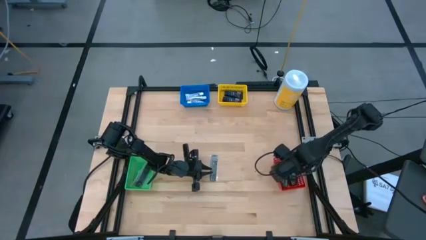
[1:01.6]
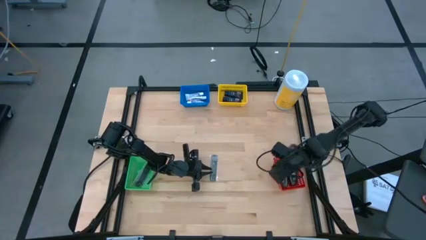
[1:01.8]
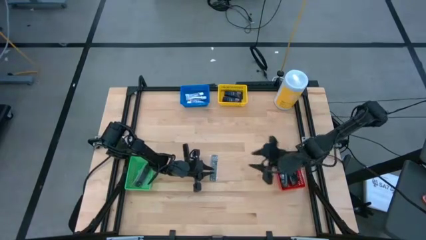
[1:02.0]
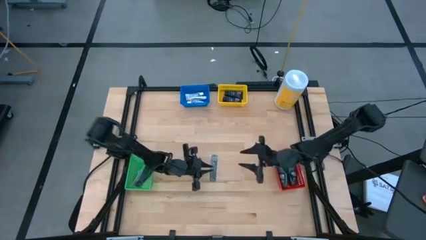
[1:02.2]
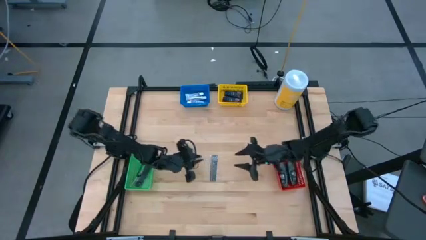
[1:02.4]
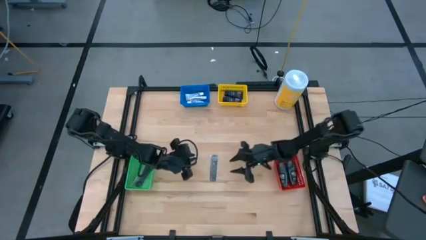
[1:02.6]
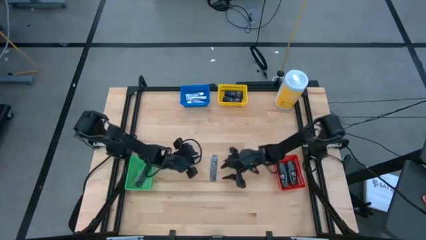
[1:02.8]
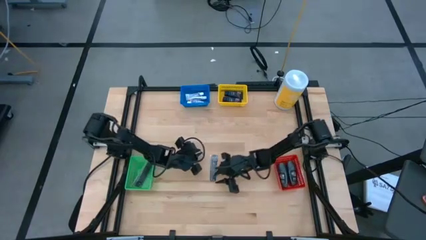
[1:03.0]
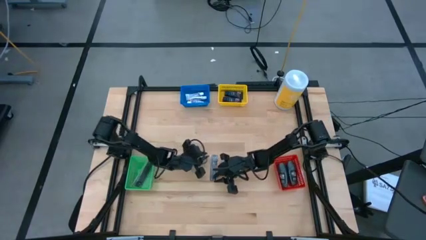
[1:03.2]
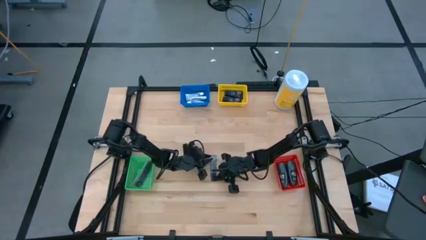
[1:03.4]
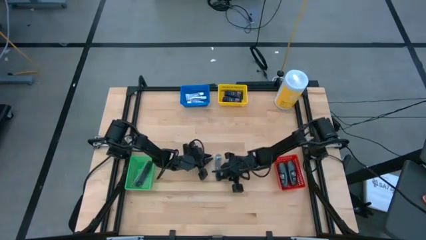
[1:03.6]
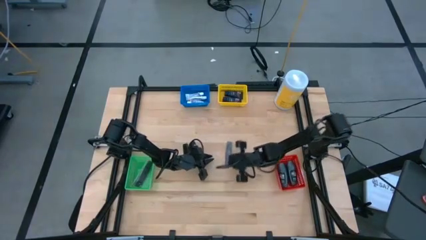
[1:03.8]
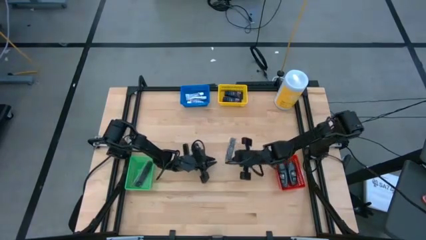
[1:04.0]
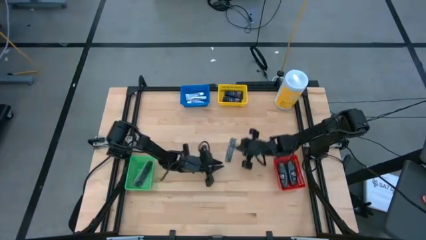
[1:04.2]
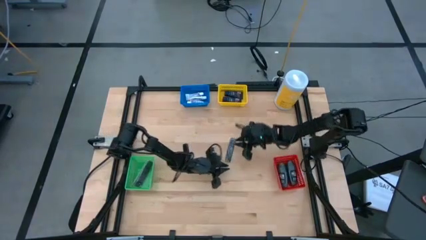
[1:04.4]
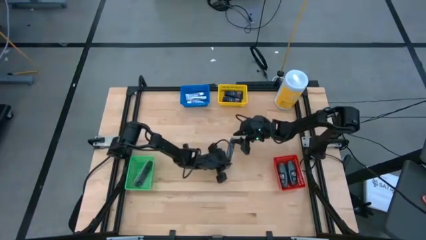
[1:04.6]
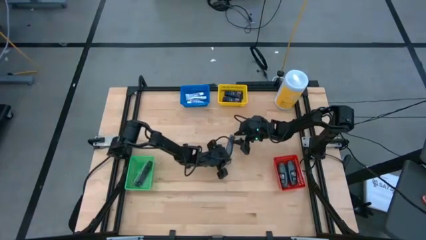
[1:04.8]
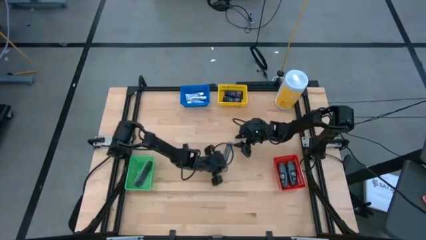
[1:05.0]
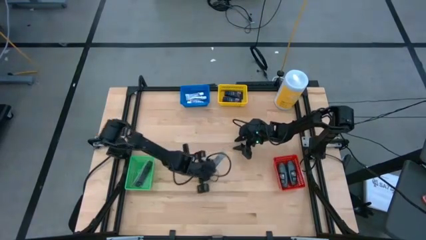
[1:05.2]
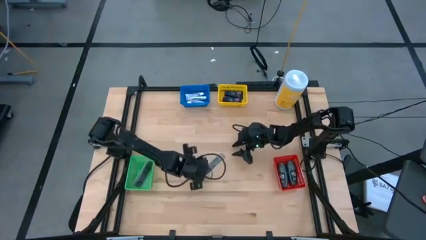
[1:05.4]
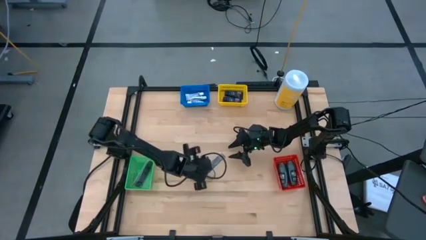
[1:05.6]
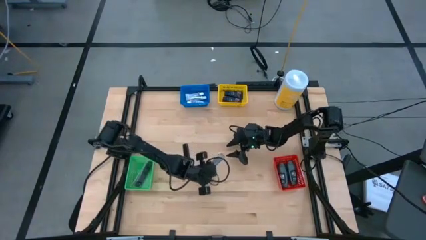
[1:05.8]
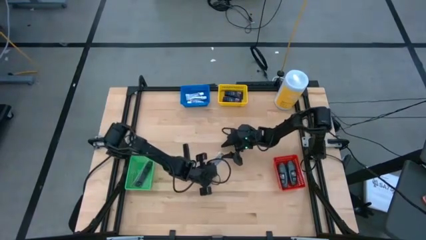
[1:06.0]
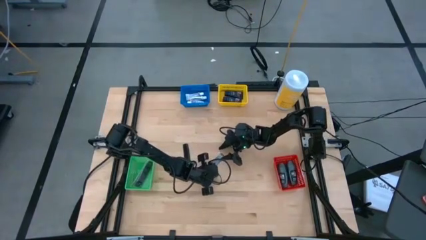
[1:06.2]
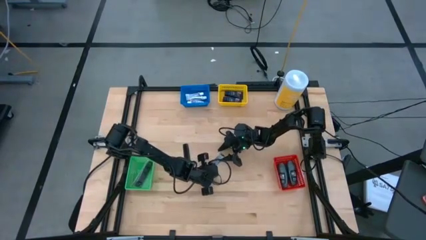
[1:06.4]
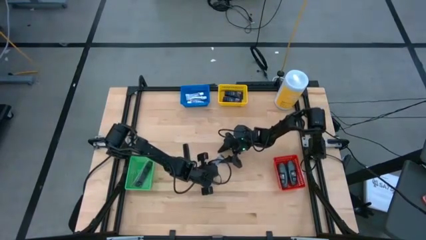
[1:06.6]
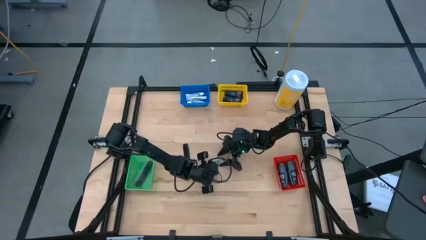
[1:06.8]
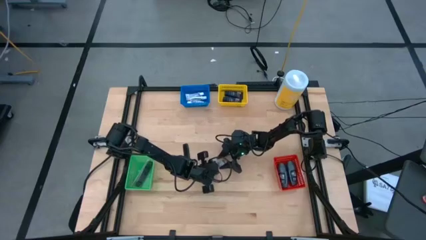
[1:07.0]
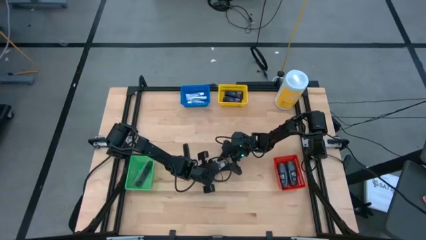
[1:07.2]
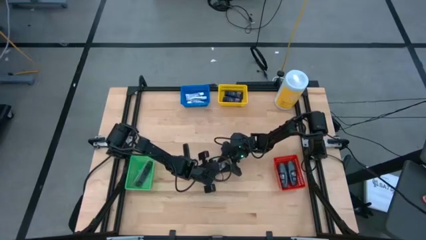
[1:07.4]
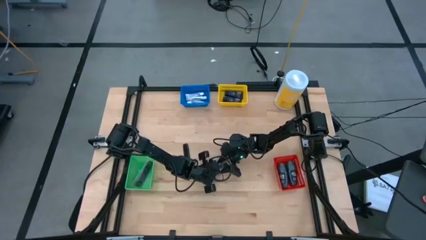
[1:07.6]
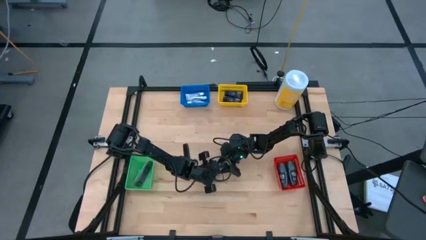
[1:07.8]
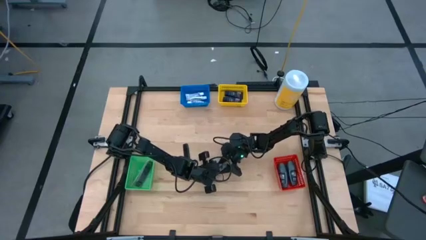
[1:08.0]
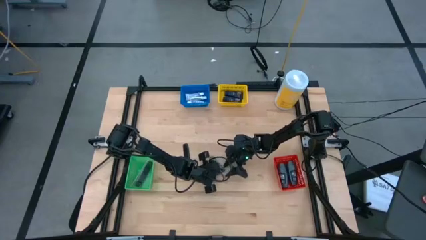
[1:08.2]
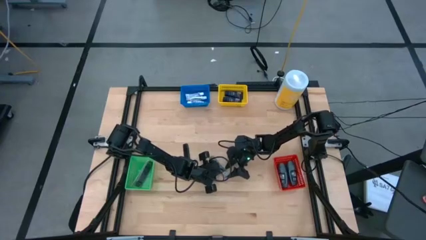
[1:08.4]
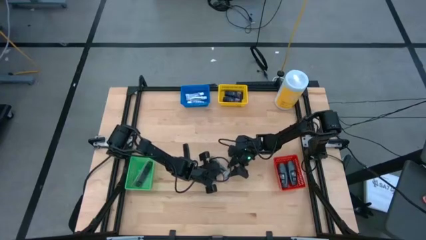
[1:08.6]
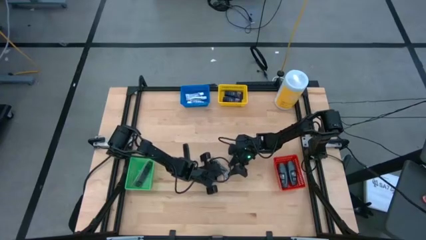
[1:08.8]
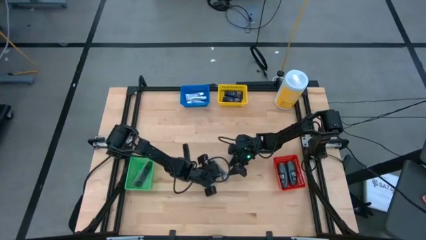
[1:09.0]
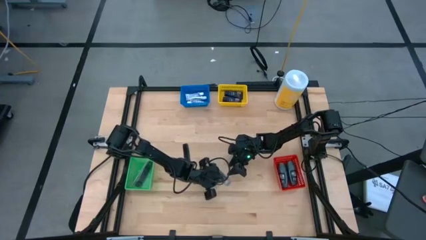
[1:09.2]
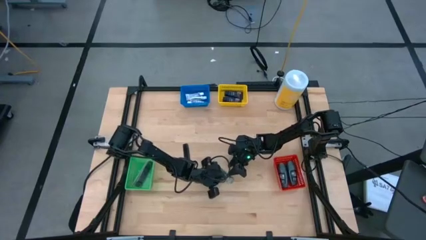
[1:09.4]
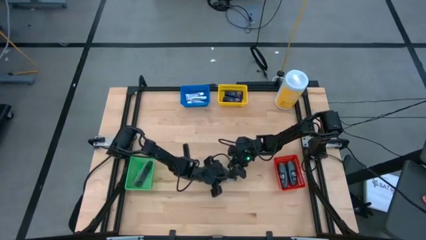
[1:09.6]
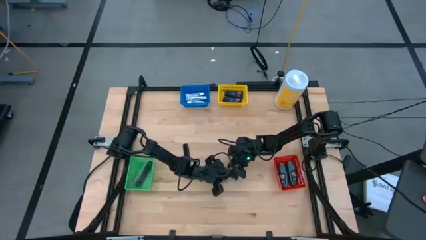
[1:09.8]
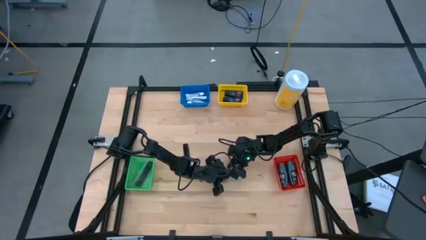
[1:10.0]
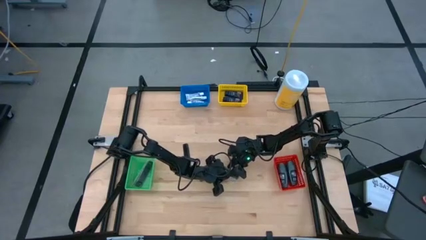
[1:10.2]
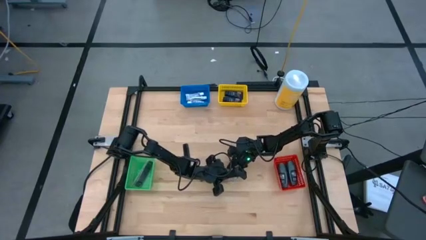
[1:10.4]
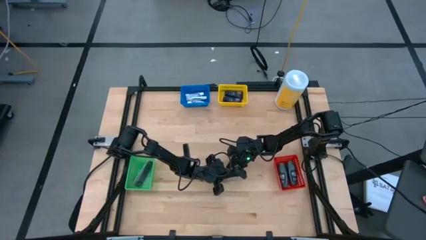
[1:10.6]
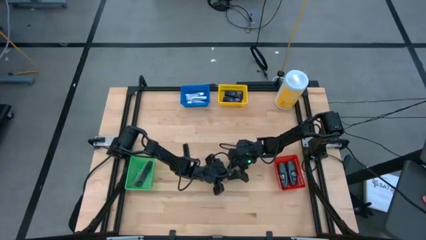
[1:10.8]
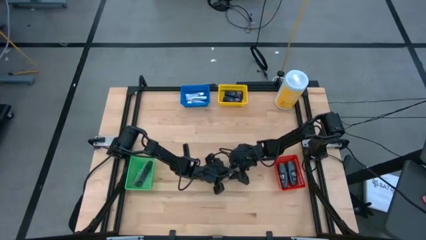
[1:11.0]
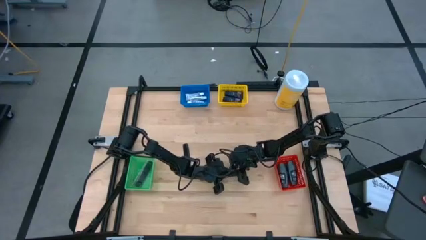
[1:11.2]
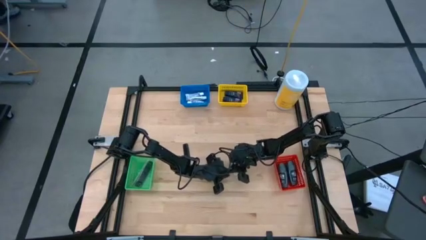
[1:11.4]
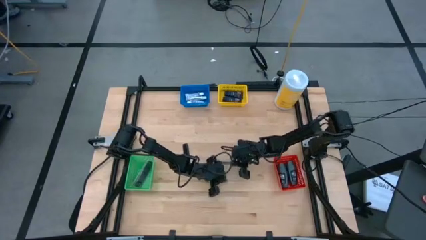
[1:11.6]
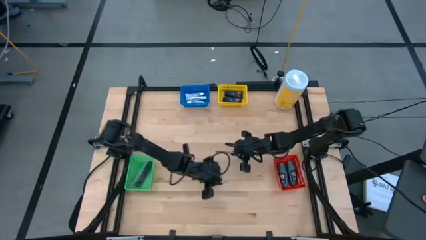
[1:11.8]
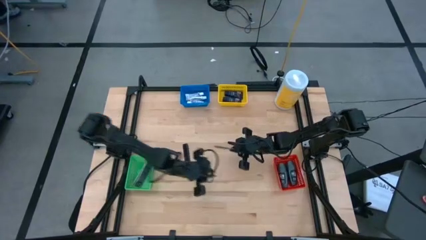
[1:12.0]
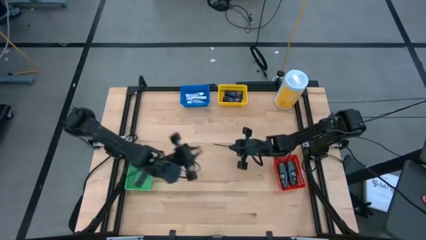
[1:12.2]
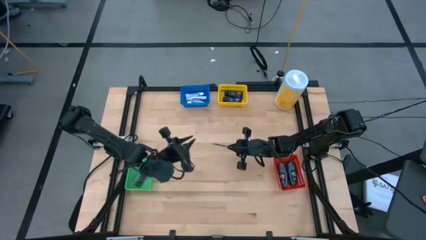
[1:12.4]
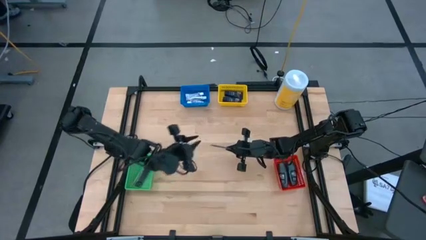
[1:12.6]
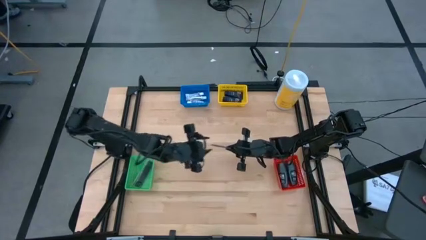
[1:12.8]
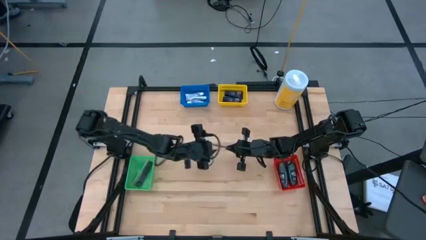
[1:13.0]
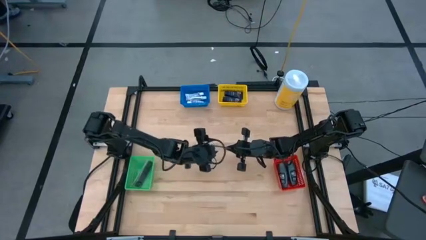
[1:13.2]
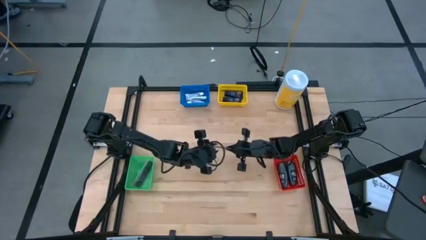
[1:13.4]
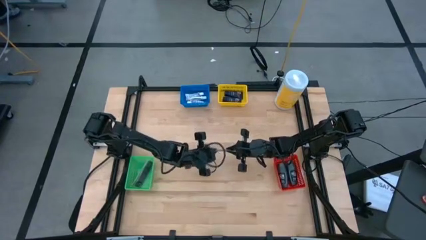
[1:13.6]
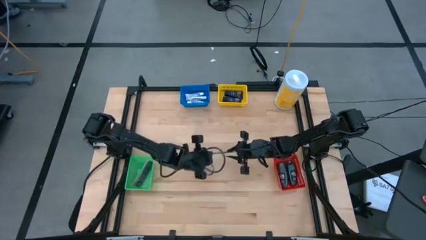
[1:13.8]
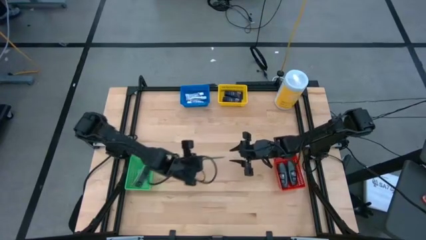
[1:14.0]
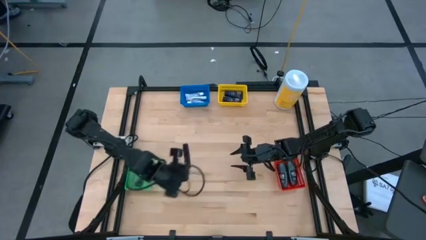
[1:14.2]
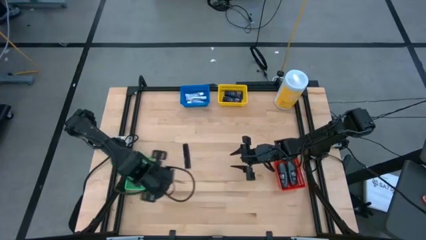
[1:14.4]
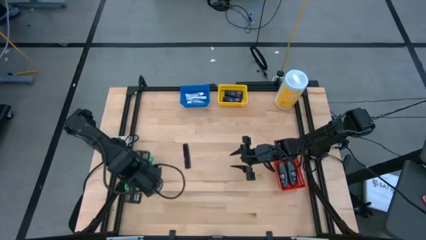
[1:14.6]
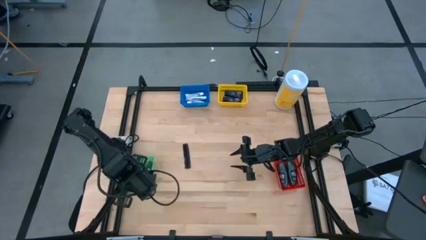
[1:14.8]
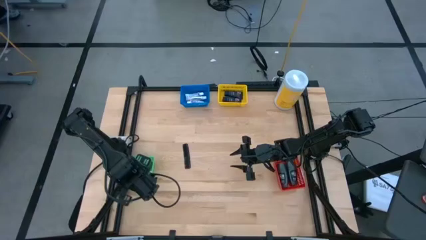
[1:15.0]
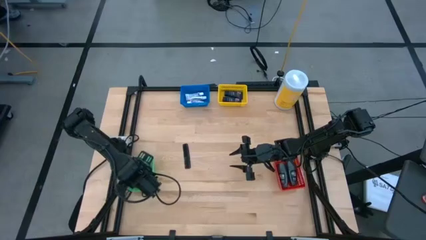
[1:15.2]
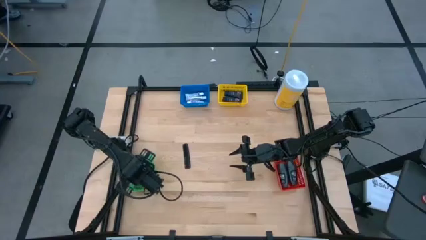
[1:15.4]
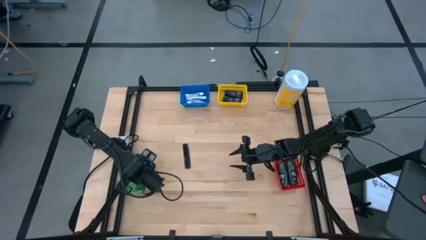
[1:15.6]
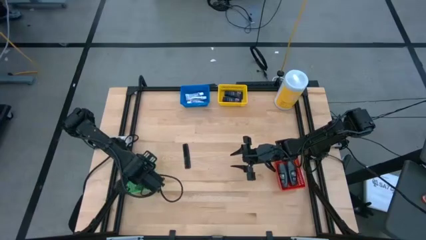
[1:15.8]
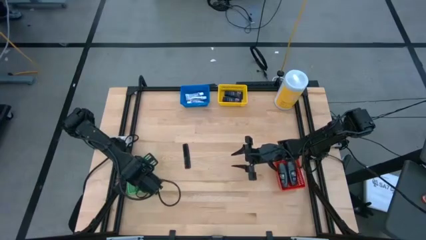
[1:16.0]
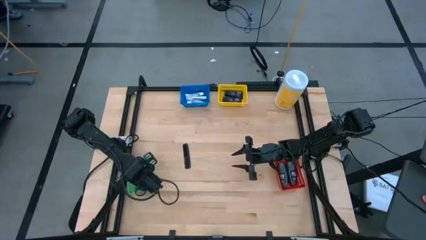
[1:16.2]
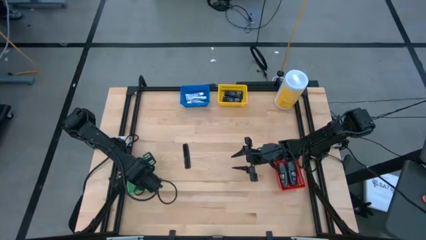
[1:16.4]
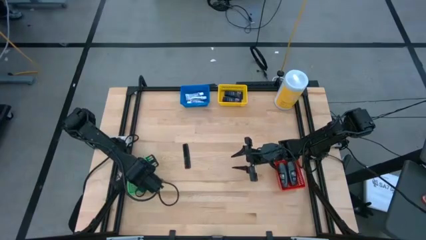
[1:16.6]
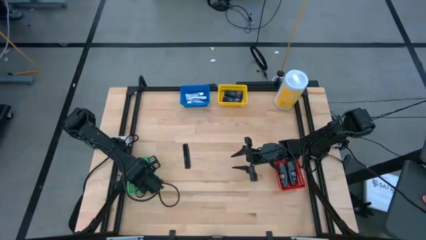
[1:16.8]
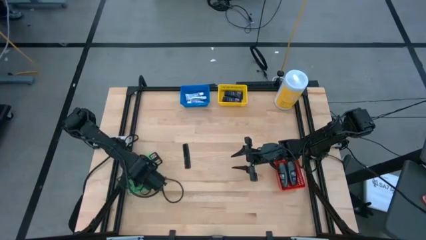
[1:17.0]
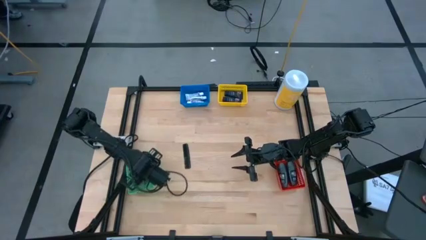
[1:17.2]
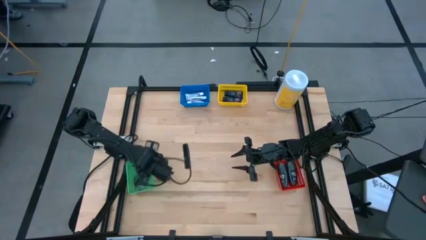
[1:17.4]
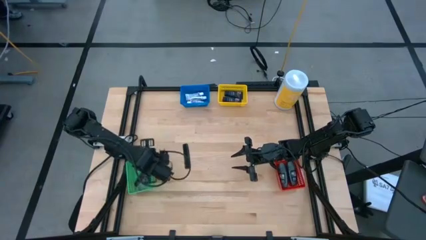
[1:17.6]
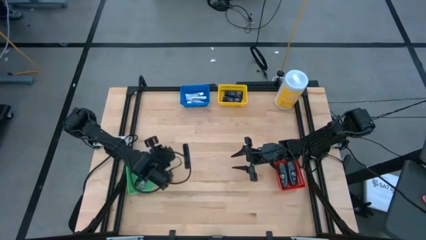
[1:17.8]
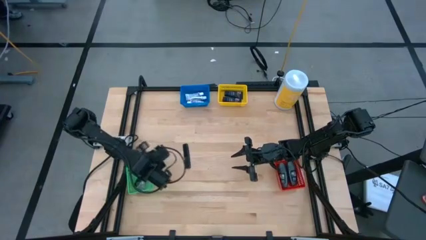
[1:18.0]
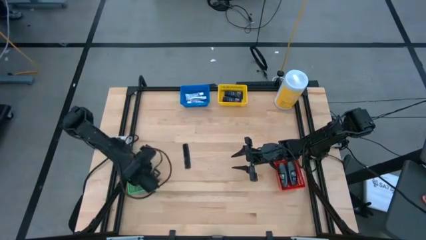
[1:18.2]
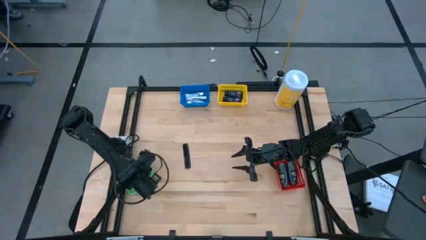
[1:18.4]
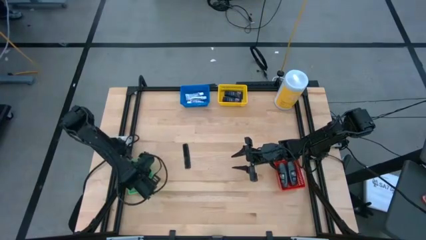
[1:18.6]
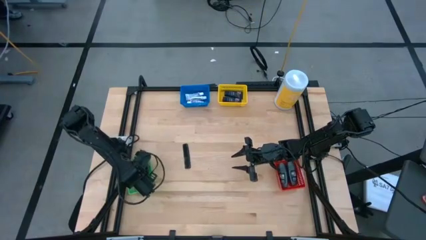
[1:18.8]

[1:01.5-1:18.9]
Task: Pick & Place Travel size toiletries
Put the black hair comb into the green bin
